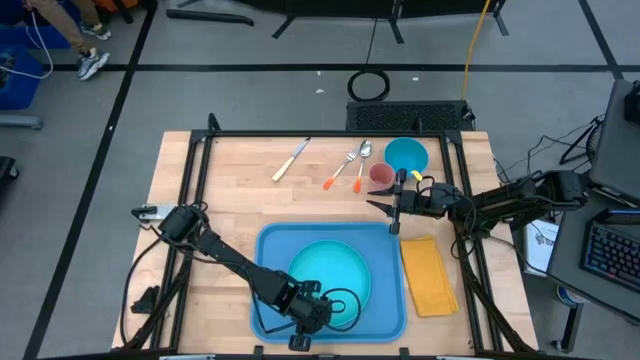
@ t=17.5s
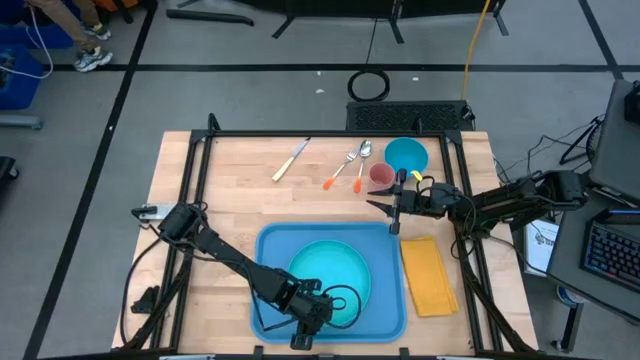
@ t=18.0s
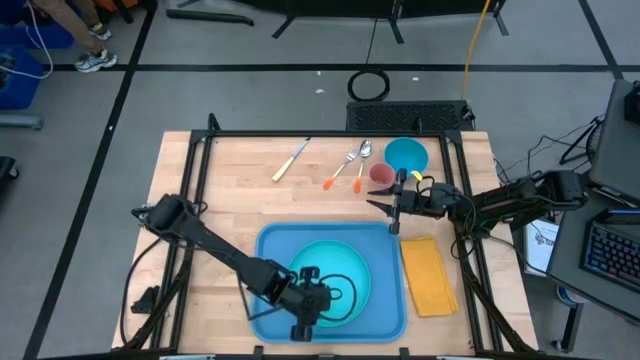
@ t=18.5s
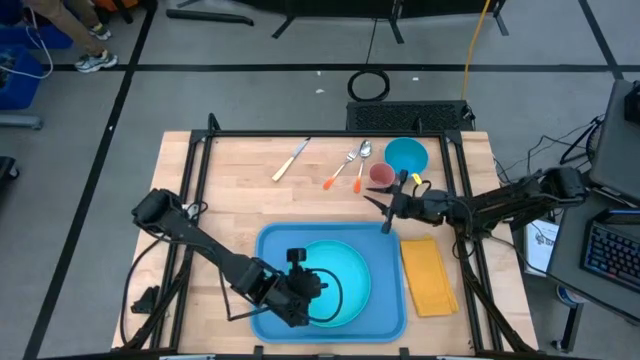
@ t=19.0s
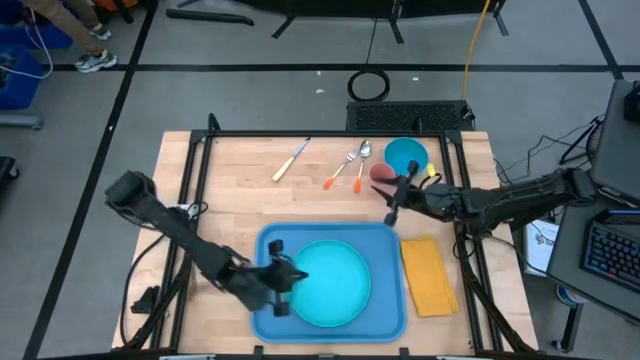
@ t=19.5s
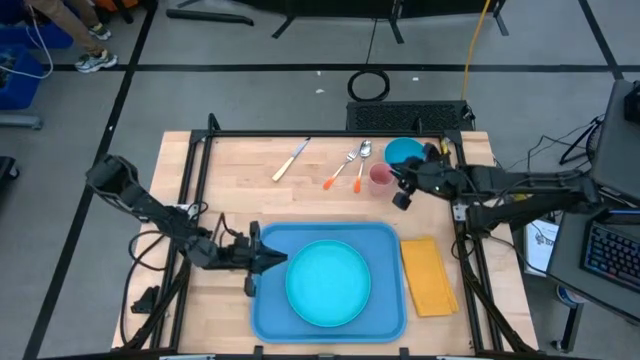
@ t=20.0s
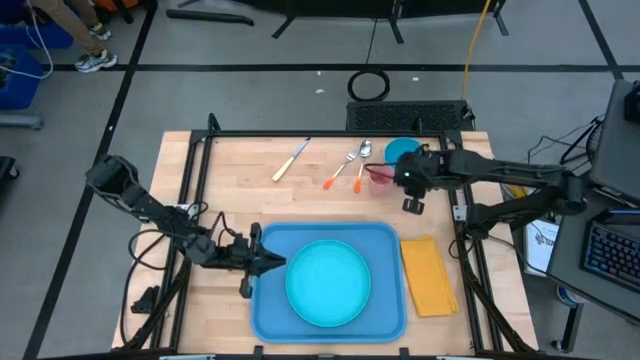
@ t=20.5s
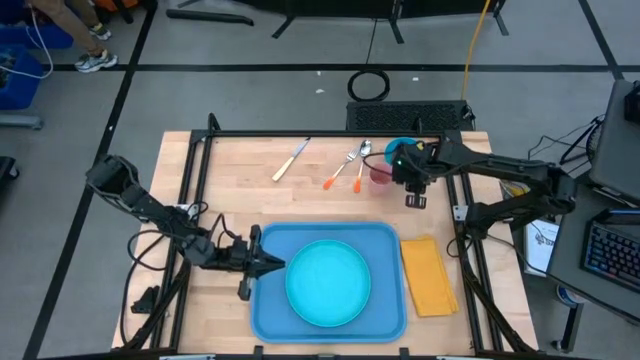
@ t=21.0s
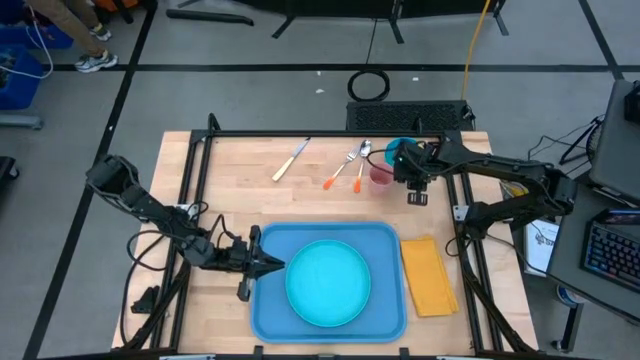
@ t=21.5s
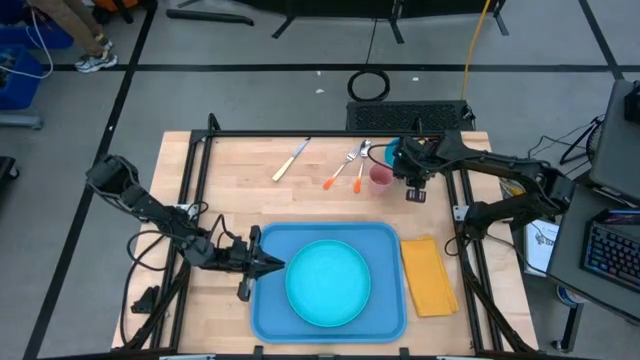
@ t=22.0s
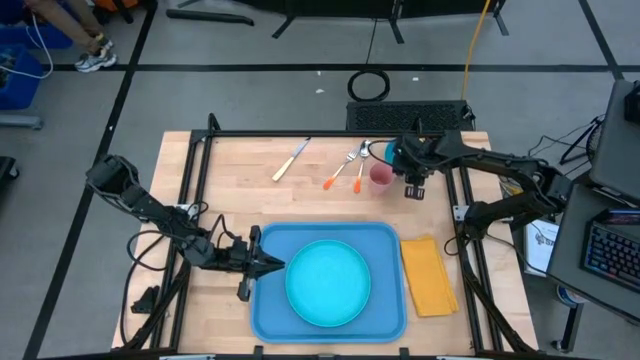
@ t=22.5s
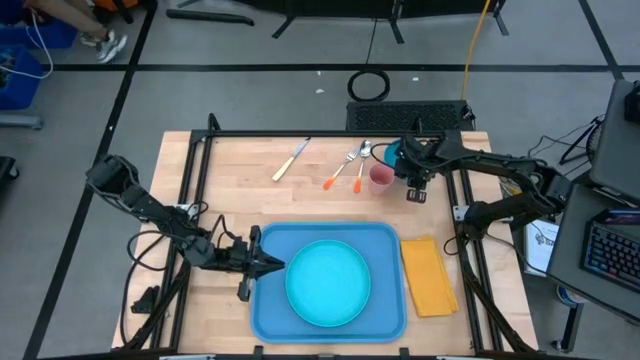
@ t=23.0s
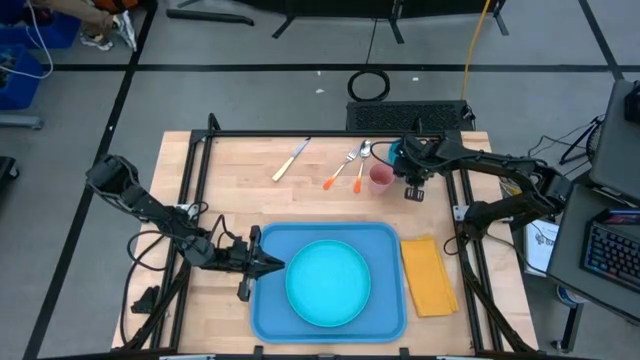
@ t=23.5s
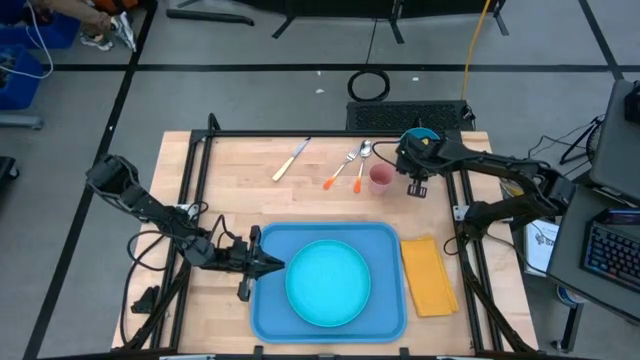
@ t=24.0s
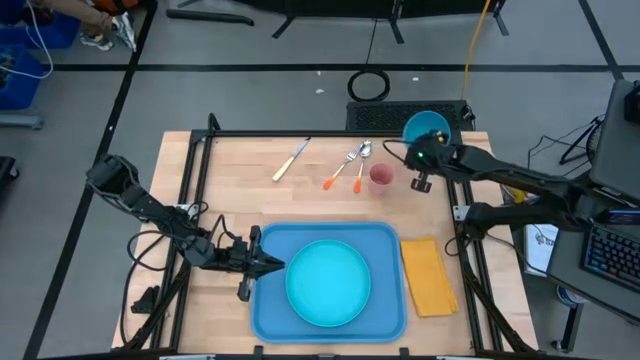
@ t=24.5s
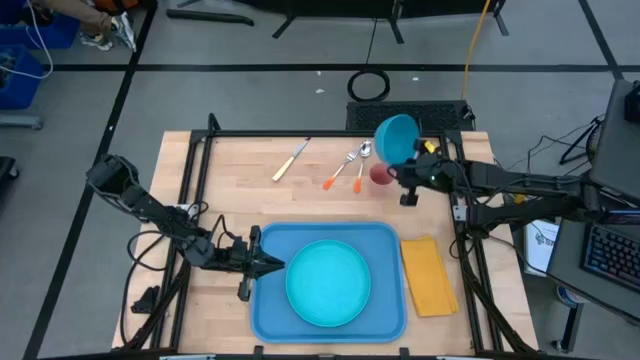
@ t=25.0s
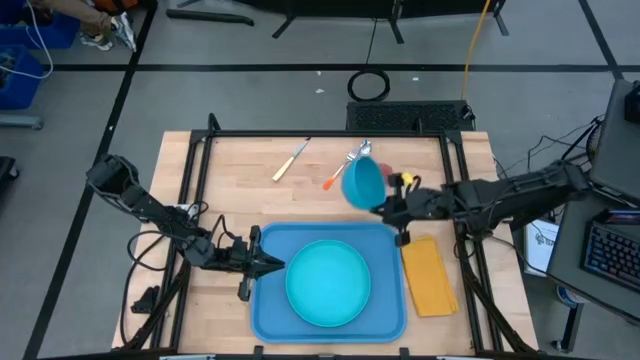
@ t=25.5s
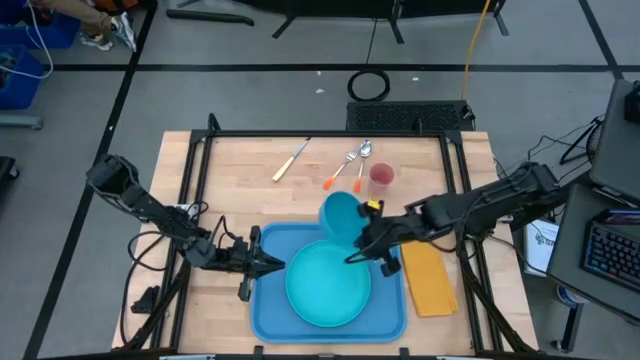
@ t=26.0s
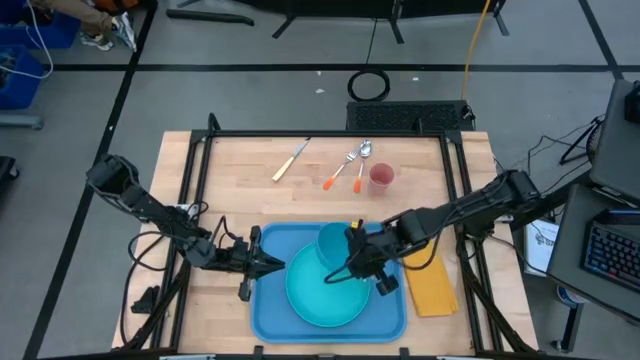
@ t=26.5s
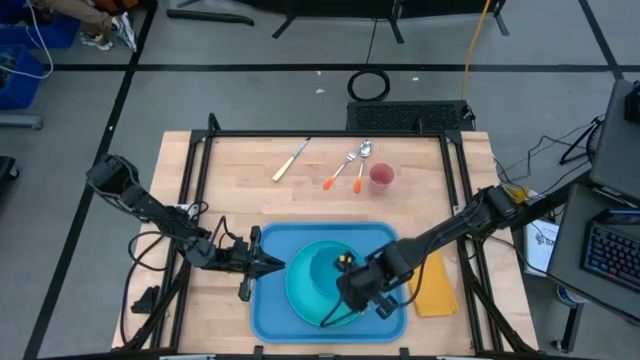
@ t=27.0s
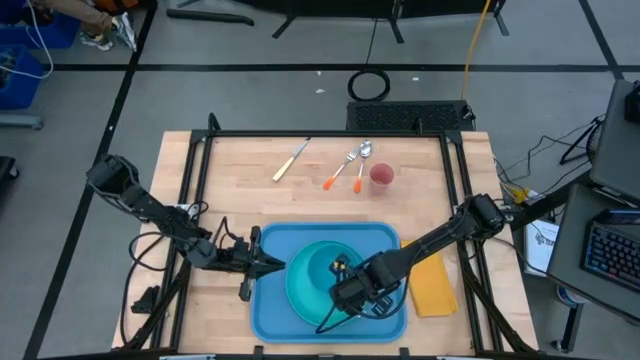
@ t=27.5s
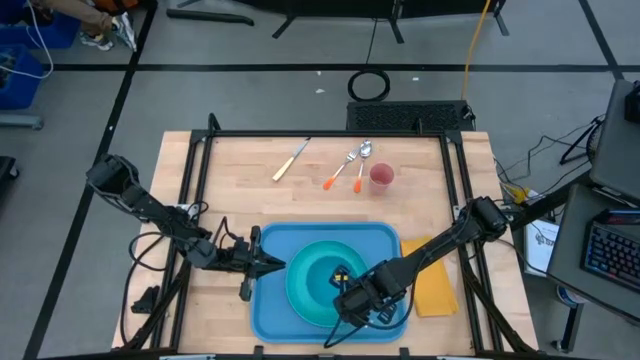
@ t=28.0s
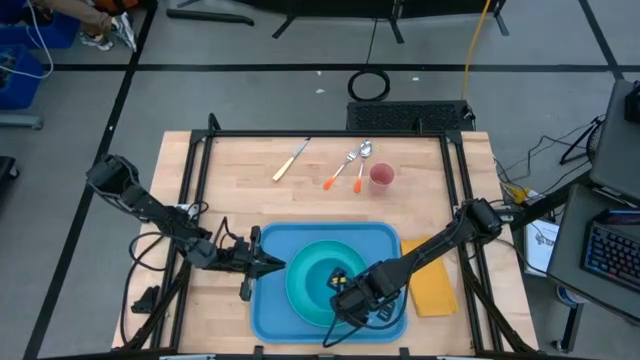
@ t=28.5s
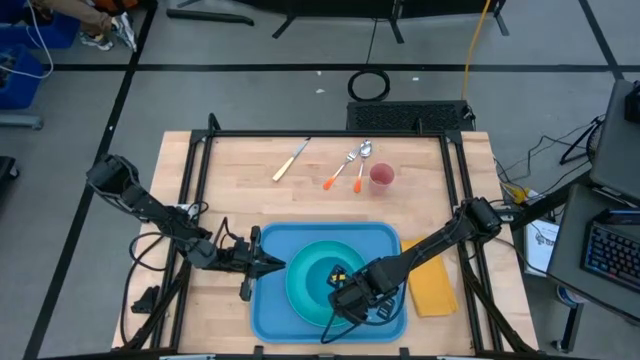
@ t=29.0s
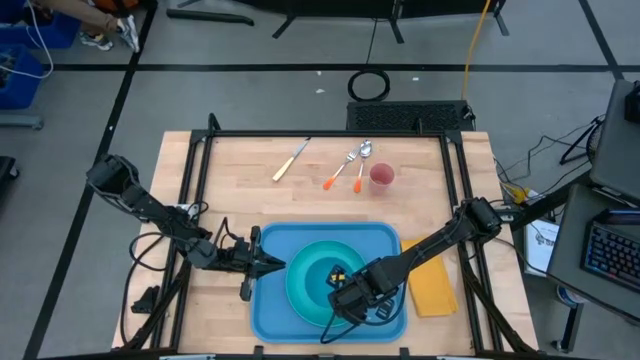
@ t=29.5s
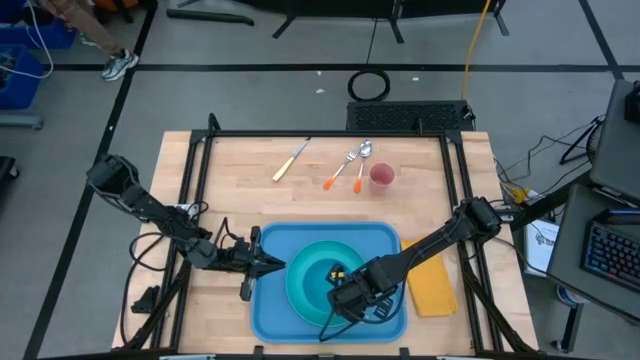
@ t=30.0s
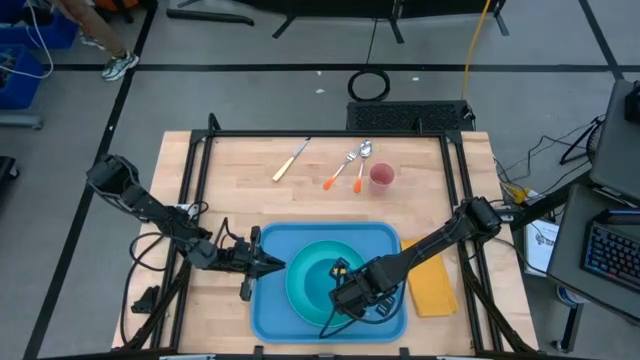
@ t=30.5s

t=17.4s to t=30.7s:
Task: Set up tray
Put the blue bowl on the light blue plate

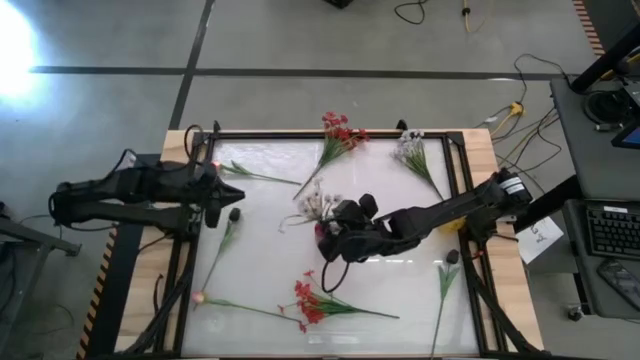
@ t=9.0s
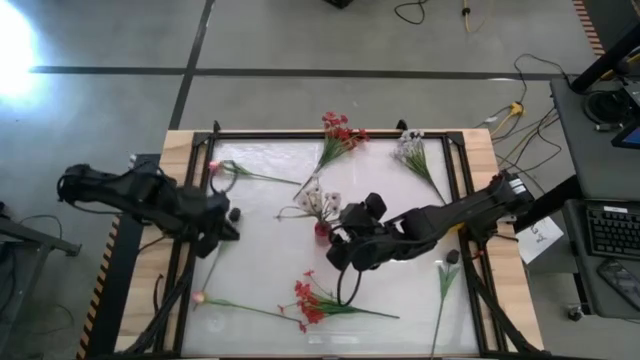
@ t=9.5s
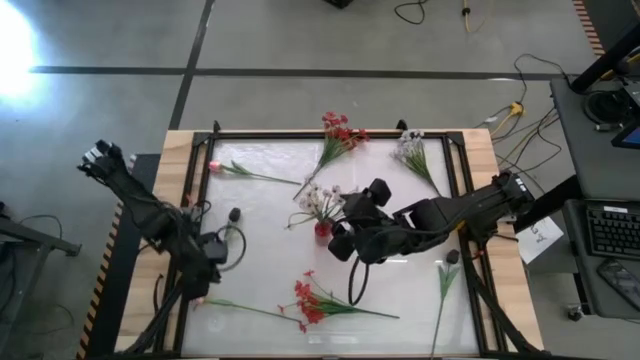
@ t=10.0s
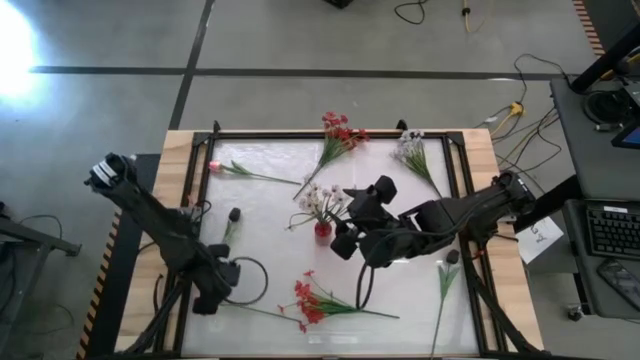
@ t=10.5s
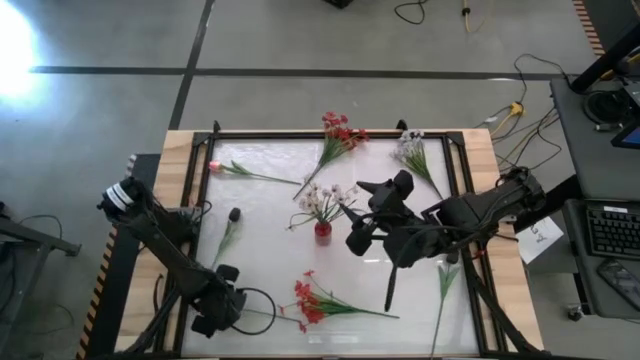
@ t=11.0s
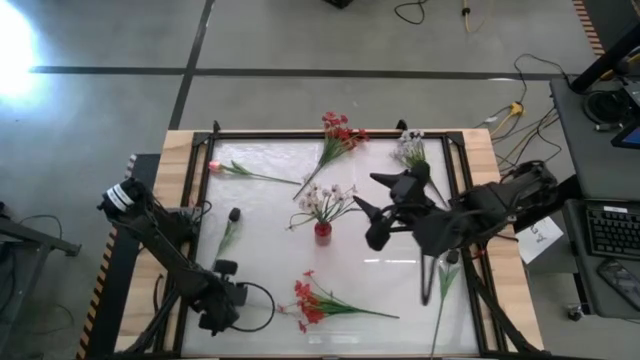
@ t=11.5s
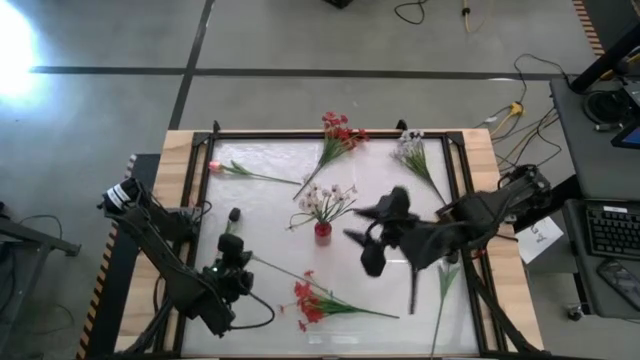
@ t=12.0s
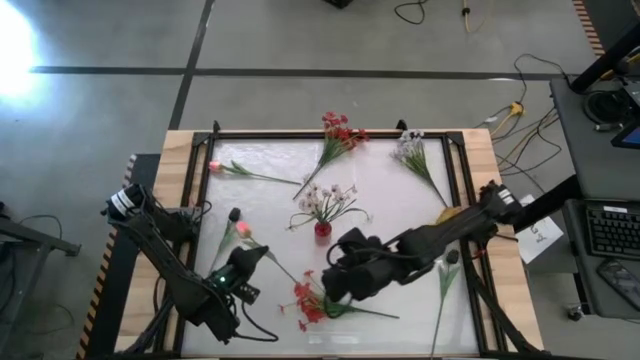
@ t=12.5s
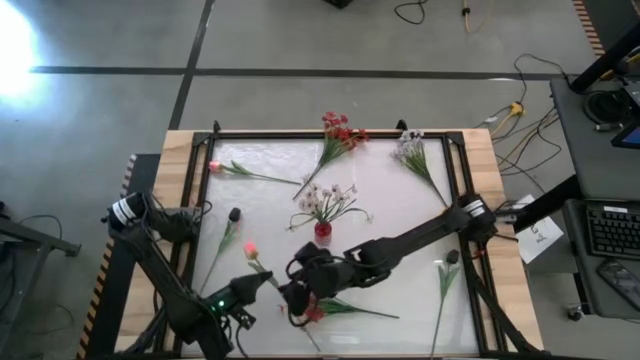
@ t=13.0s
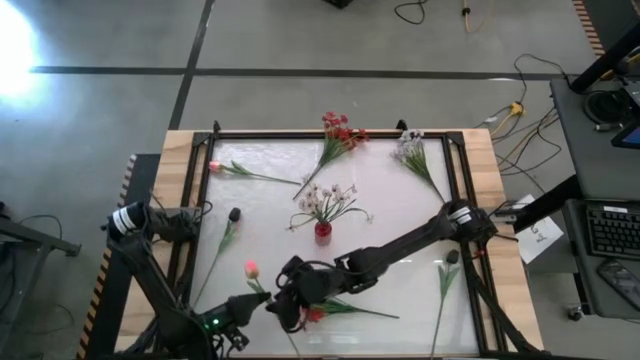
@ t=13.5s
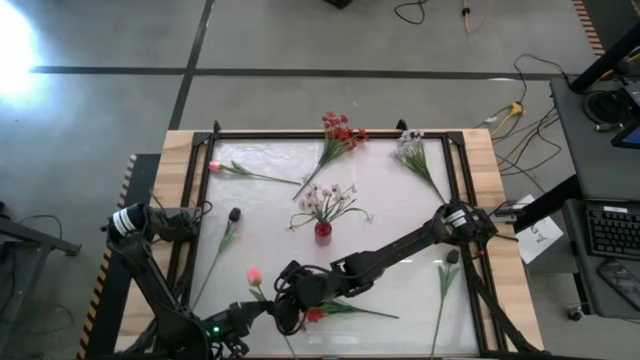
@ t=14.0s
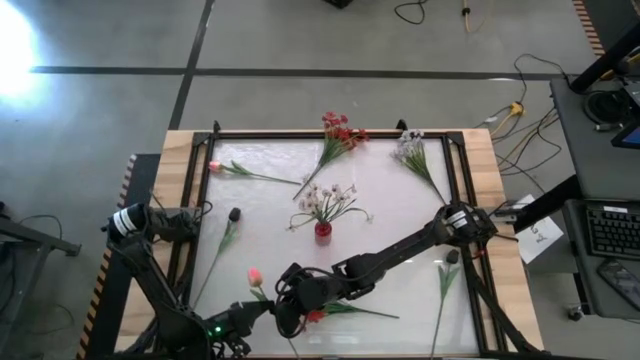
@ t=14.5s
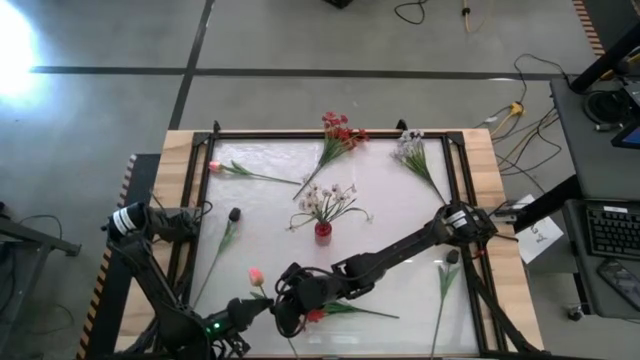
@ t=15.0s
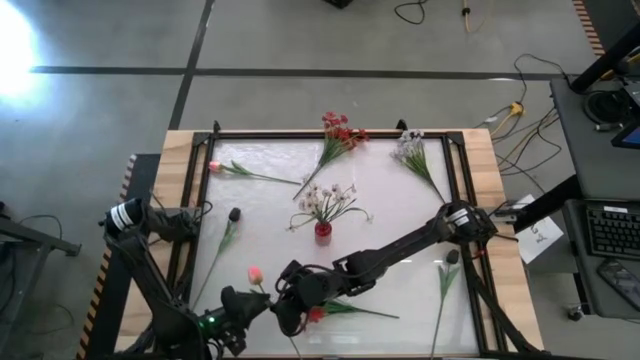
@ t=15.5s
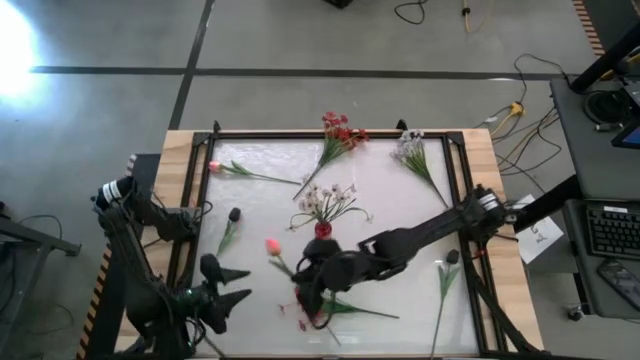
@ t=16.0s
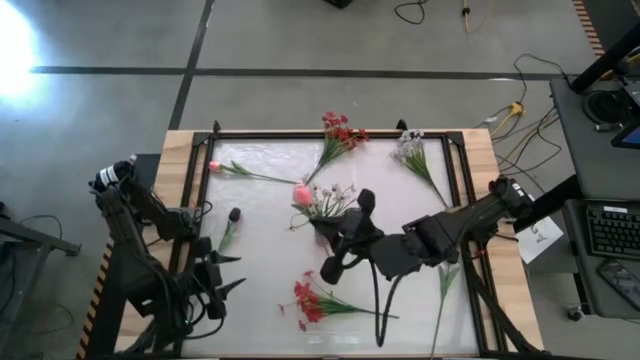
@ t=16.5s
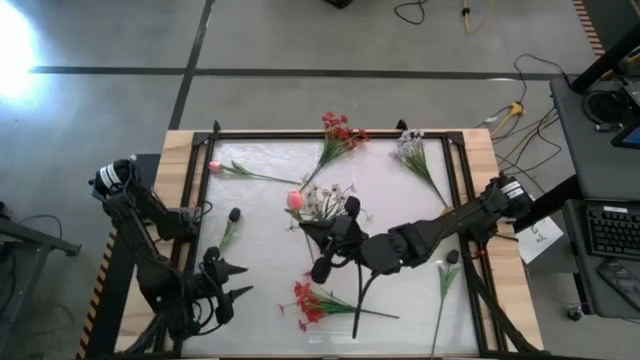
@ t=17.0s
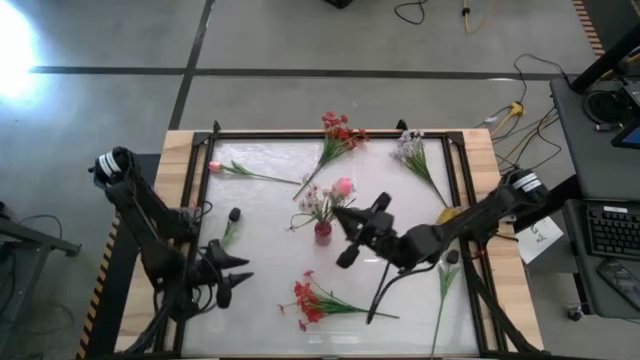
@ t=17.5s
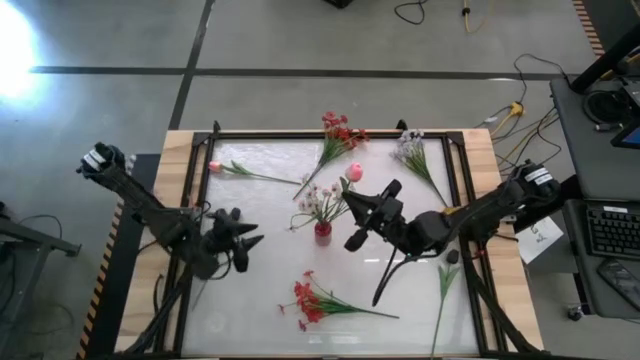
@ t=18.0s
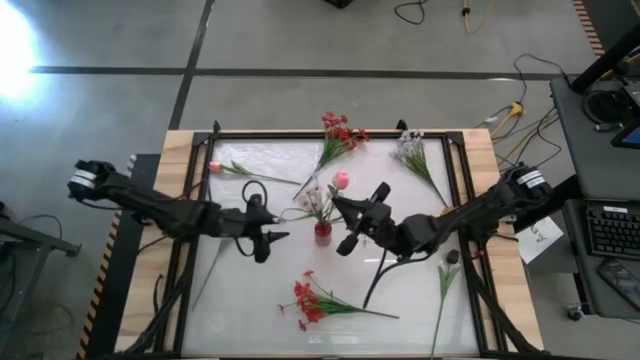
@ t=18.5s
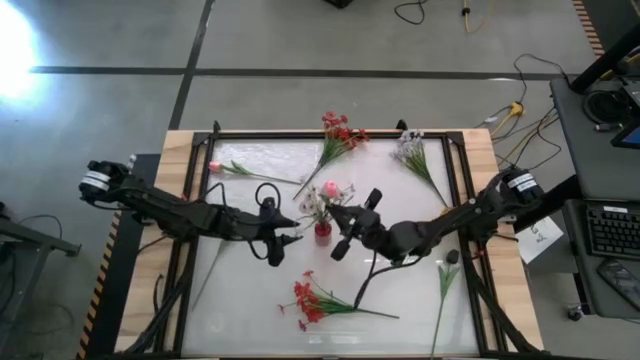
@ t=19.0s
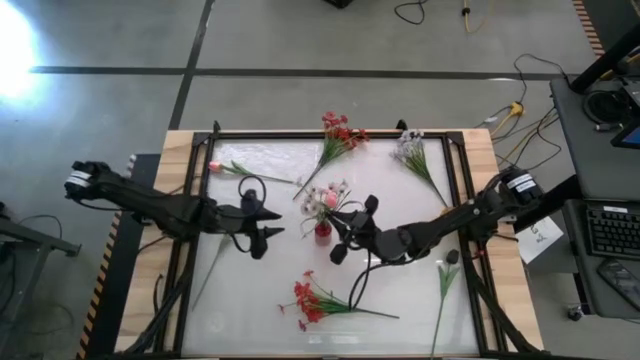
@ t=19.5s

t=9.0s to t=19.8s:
Task: Sort flowers into vase by color
Put the bottom pink flower into the red vase
